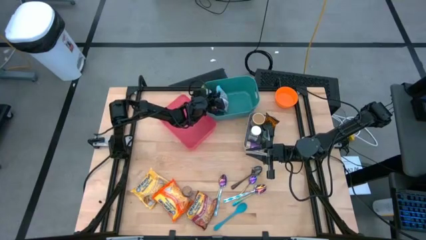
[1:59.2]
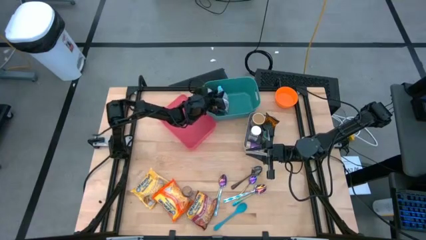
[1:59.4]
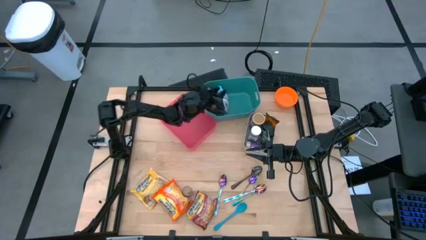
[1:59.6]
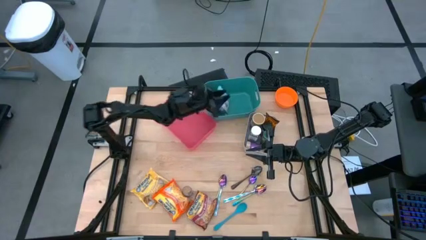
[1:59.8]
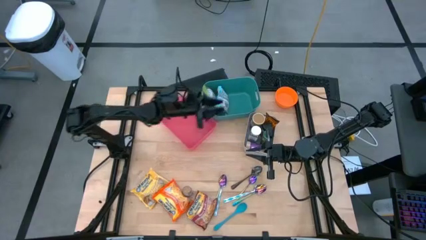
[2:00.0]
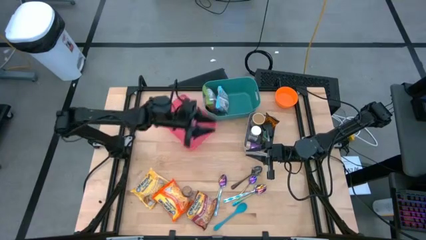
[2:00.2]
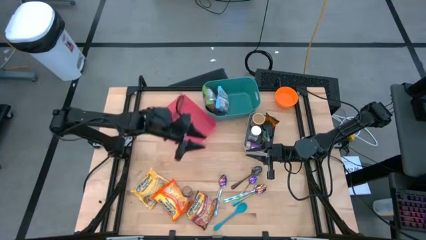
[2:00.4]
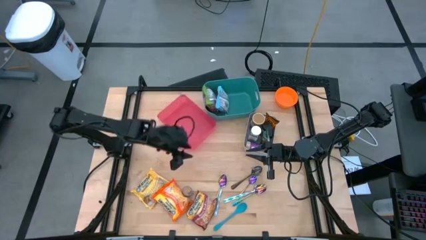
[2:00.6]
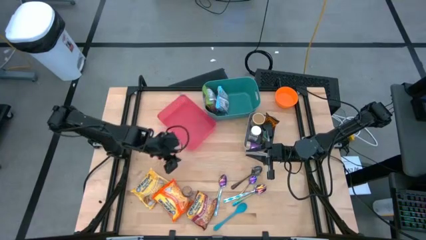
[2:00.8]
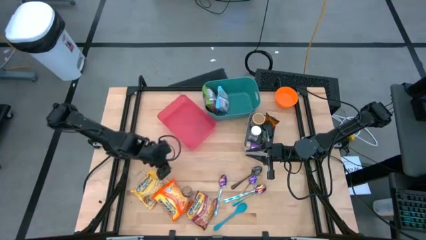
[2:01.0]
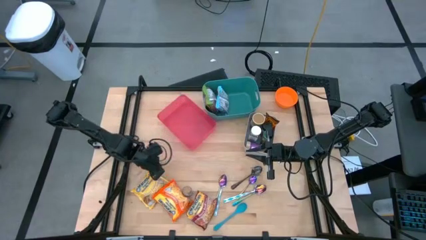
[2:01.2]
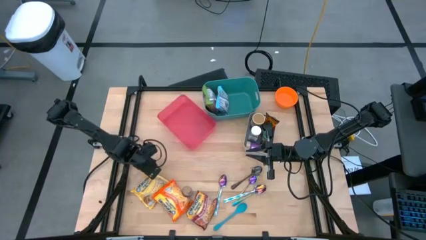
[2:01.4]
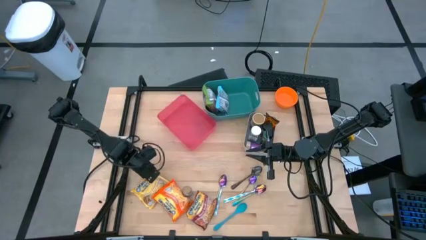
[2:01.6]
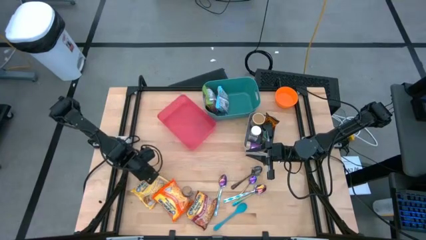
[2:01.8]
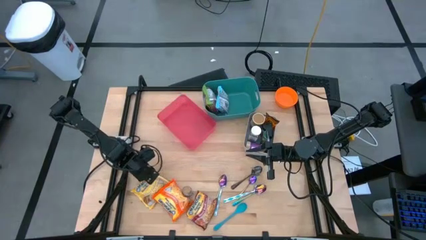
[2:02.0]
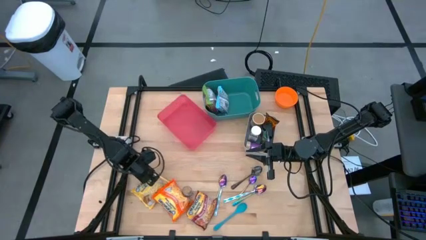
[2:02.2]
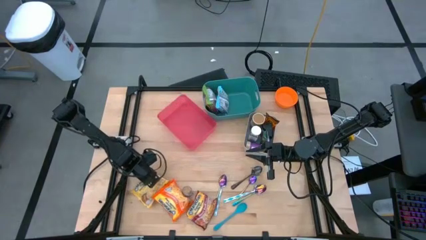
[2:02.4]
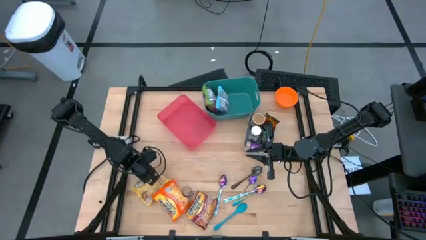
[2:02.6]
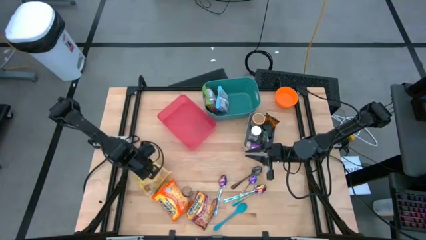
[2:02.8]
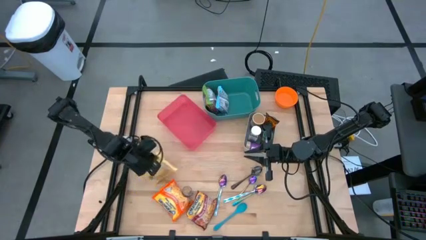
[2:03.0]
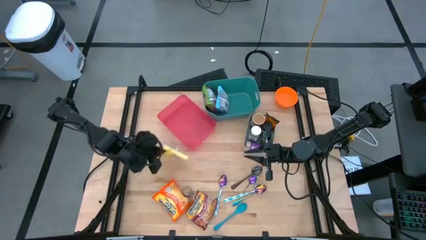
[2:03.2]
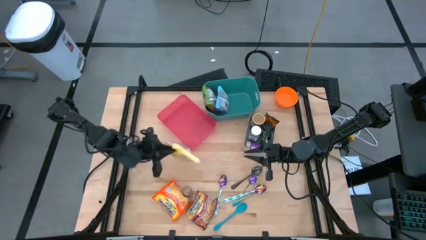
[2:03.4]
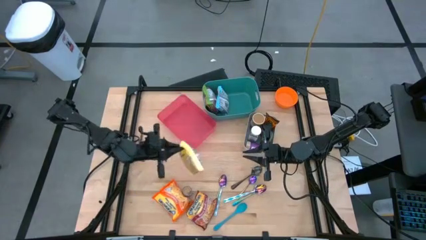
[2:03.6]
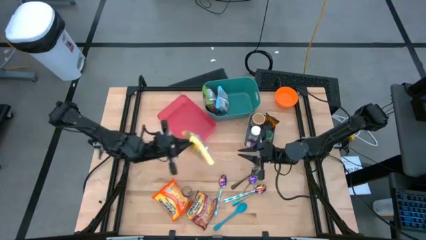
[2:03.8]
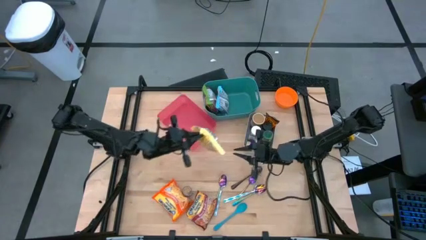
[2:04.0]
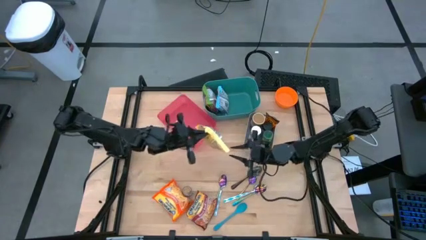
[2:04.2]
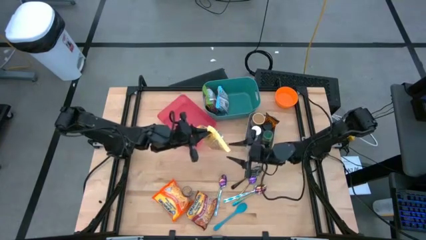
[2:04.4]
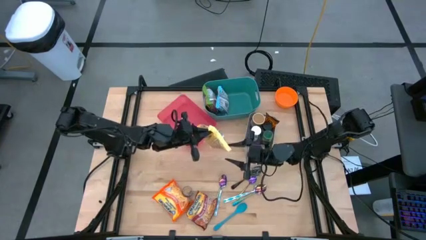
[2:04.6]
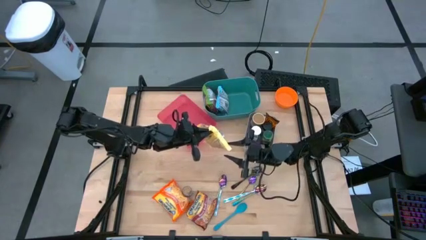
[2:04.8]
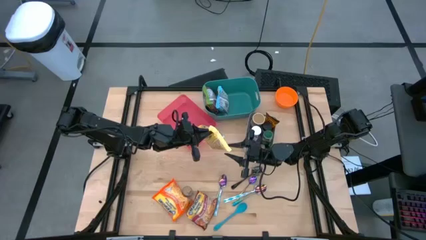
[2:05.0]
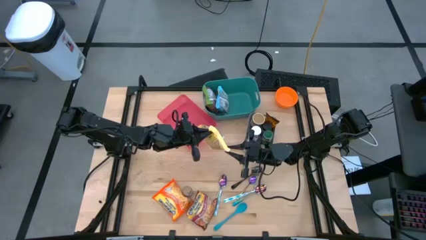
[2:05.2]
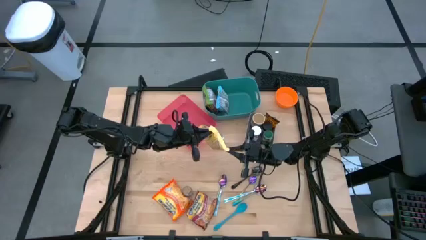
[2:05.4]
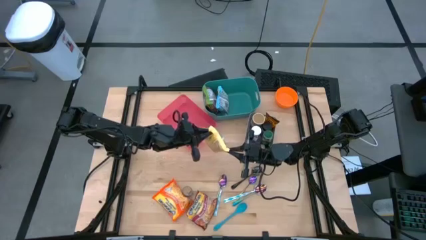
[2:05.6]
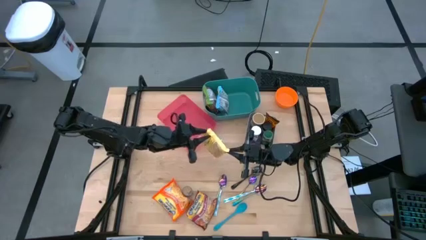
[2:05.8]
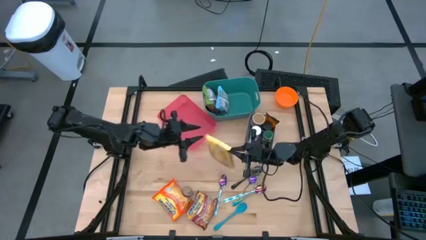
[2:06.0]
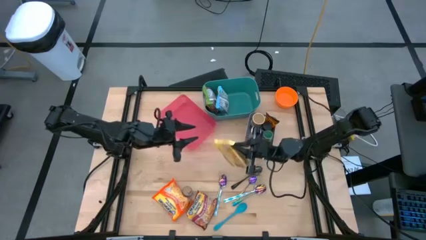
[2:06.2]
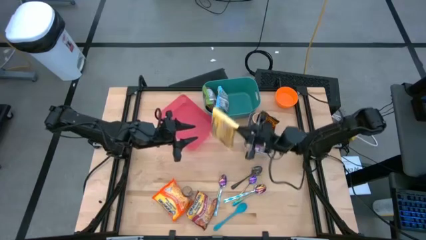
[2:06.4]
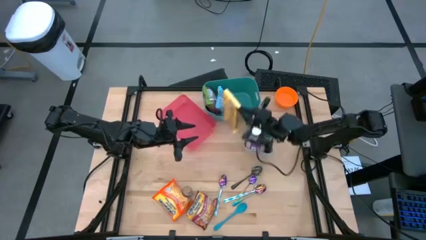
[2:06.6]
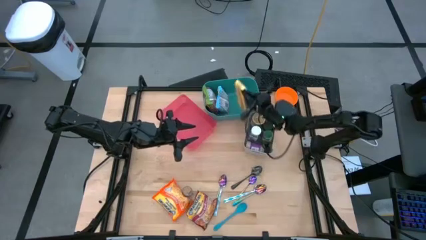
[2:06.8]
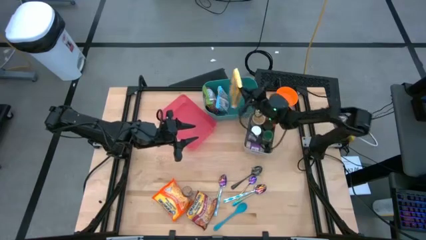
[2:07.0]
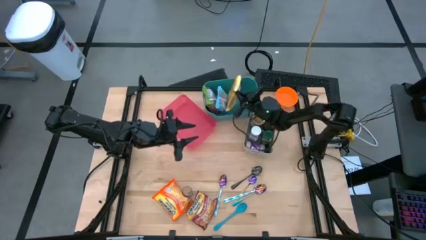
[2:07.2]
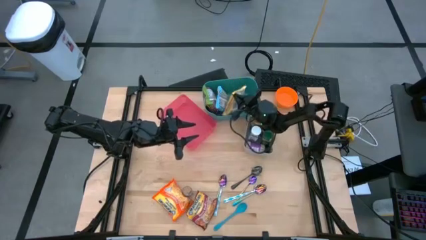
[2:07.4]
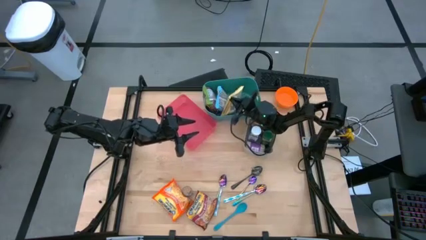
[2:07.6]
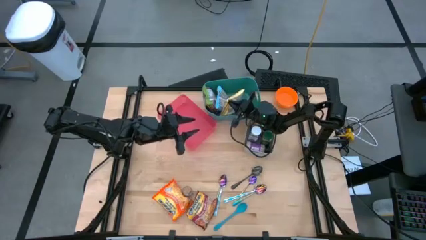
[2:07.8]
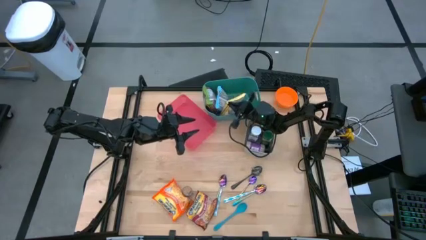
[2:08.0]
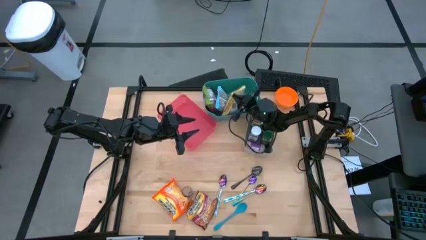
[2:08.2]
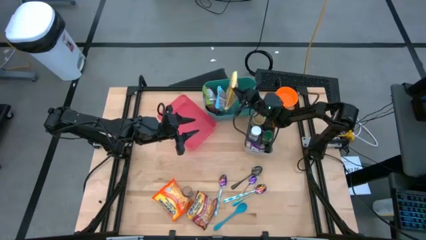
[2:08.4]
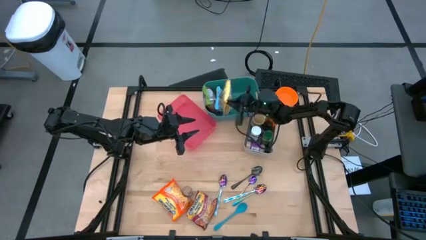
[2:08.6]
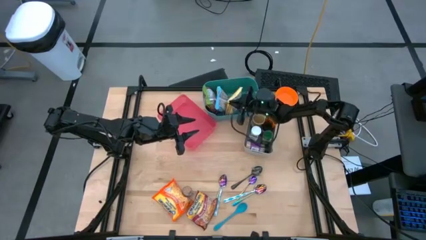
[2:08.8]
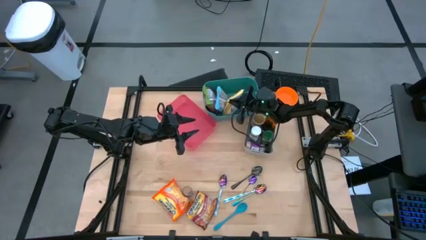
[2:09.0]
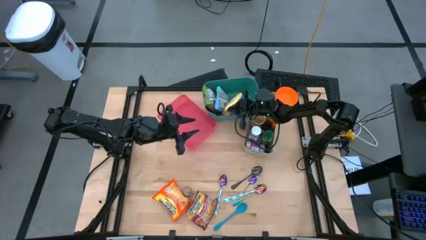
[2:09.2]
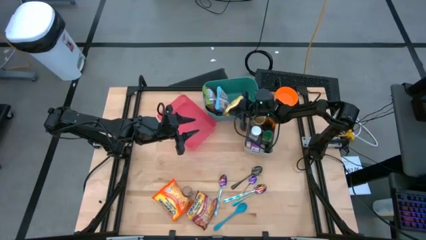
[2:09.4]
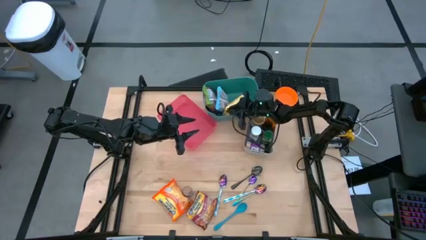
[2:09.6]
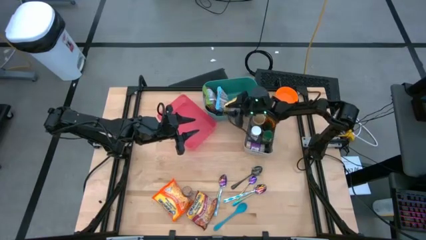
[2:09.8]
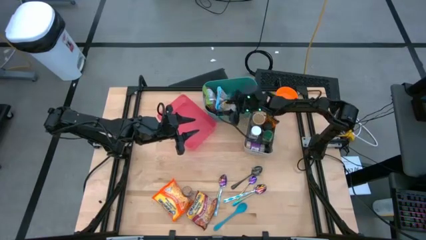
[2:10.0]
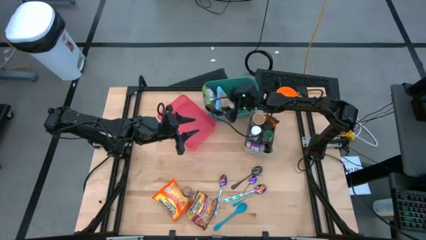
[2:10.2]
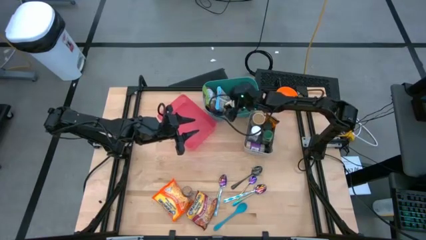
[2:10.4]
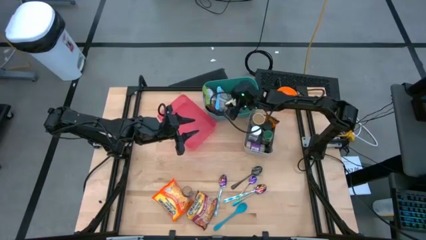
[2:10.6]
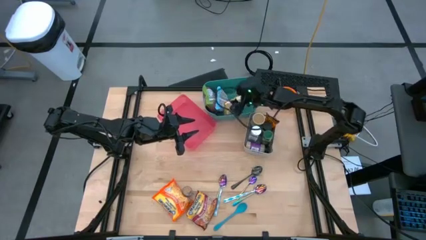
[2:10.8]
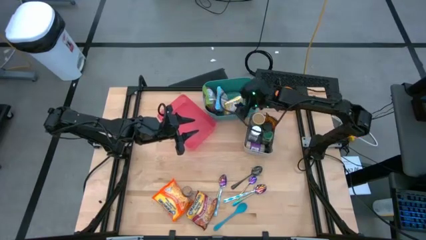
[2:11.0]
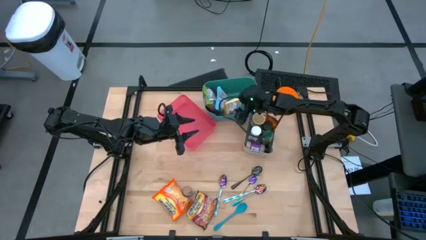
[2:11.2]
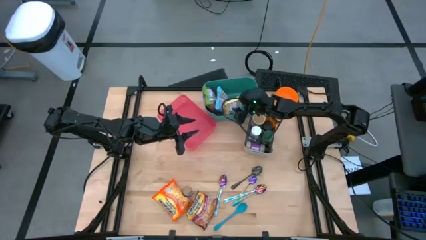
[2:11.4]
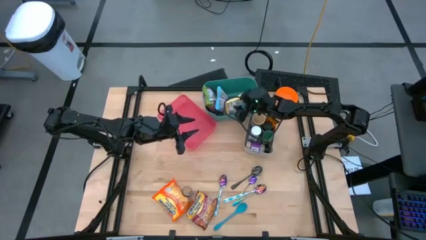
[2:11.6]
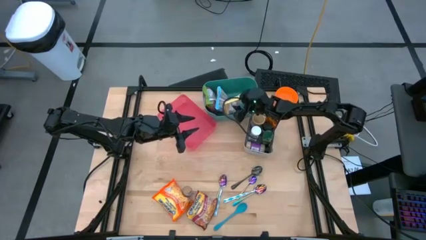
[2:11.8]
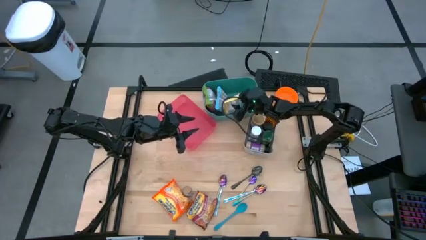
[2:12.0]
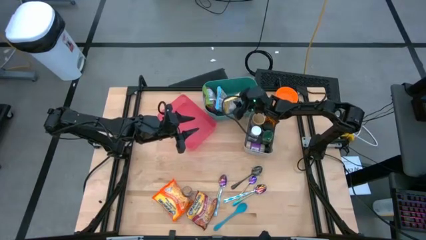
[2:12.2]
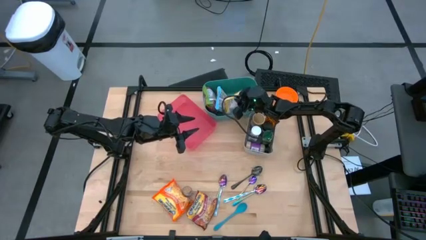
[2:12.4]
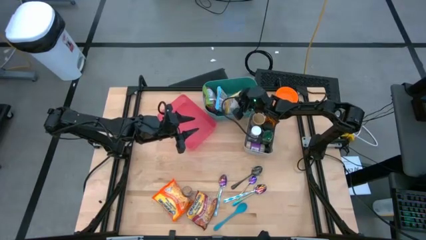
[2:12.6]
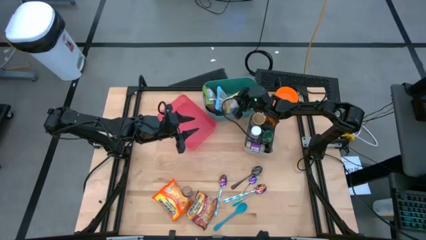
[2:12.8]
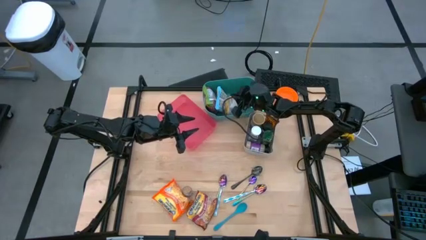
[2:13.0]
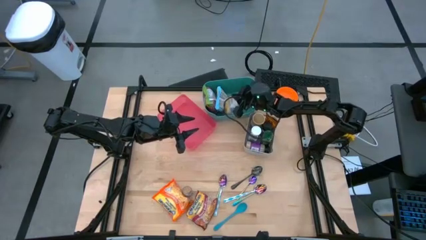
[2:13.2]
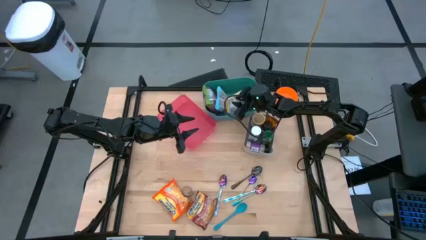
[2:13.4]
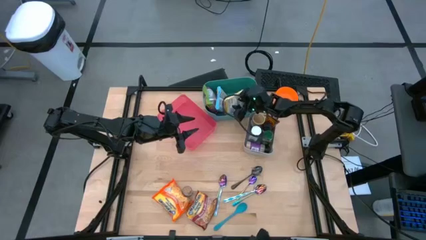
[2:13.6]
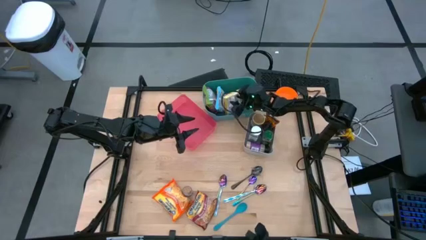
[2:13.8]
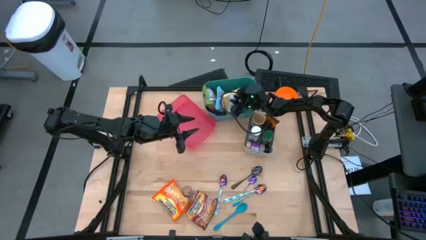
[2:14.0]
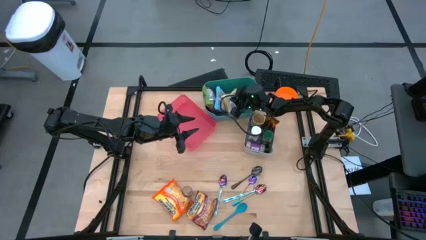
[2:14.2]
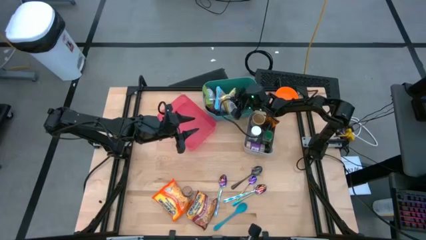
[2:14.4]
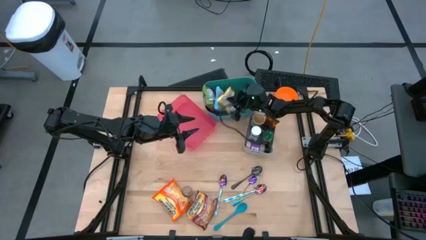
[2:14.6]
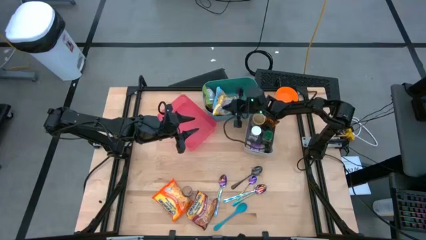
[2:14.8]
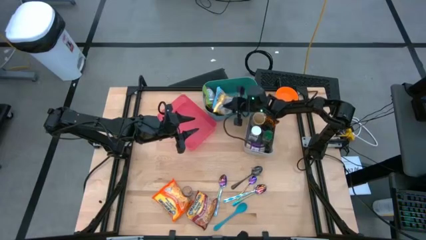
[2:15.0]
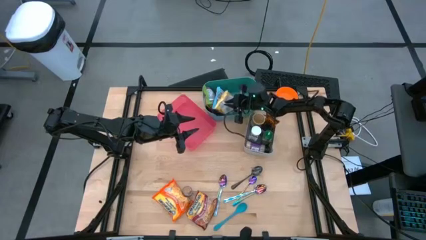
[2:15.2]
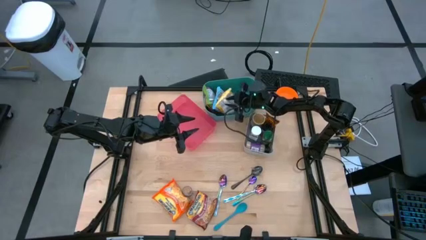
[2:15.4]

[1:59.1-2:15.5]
Task: Pick & Place Food Item
Put the yellow noodle pack into the green bin
